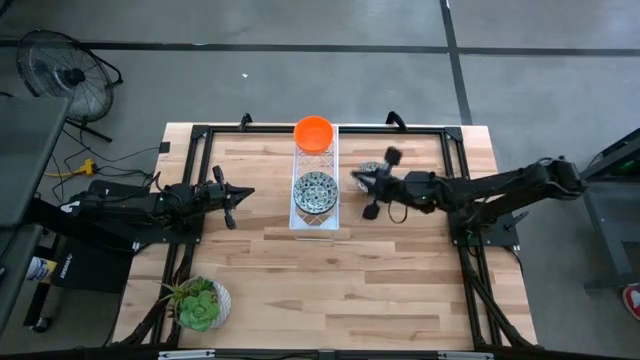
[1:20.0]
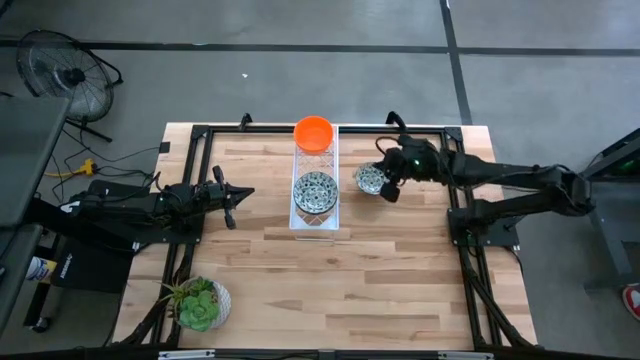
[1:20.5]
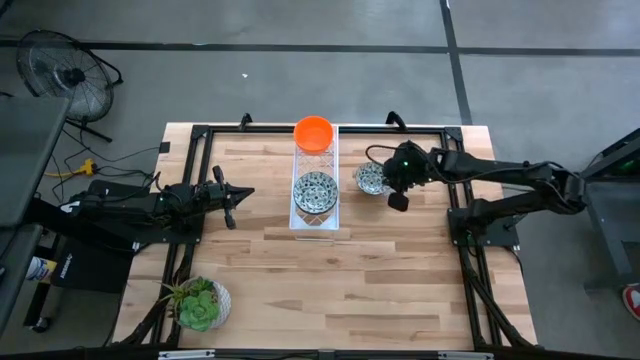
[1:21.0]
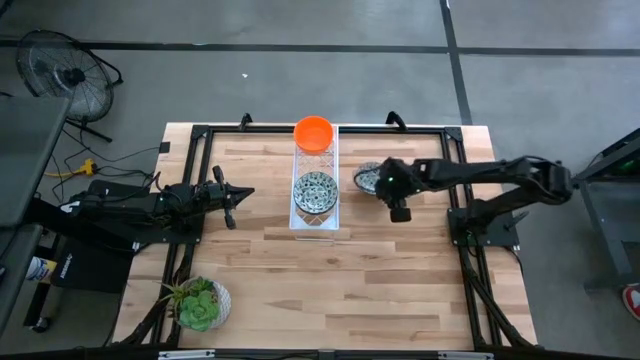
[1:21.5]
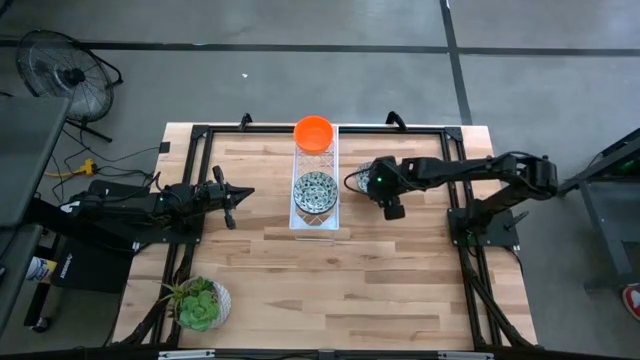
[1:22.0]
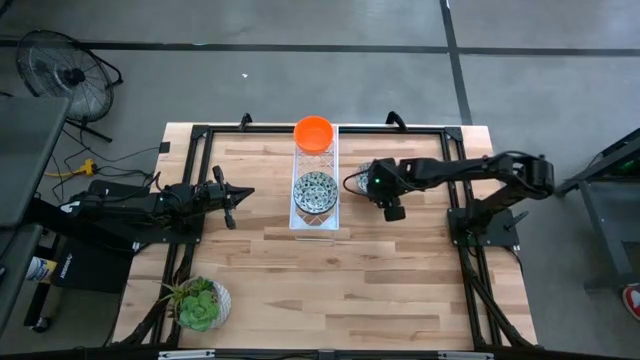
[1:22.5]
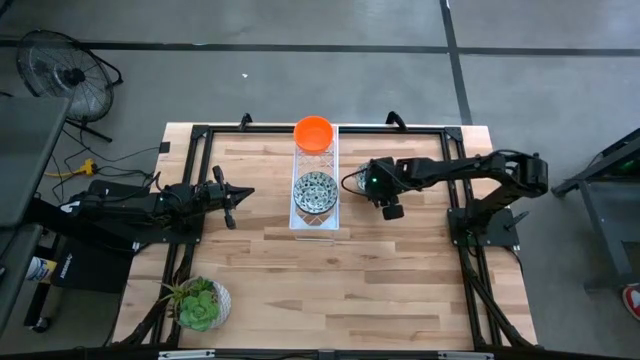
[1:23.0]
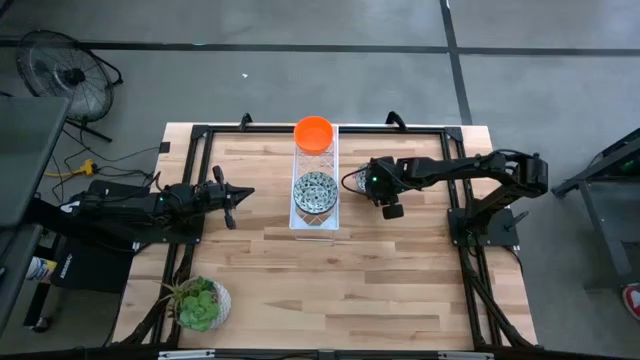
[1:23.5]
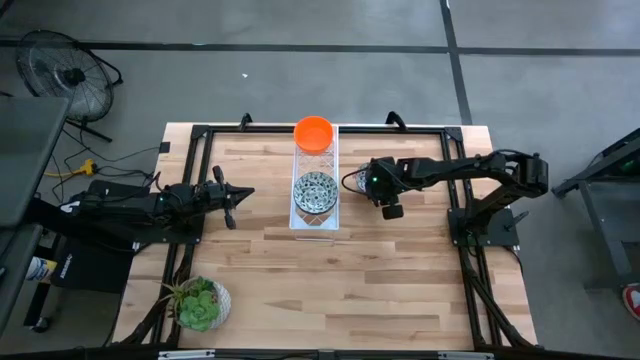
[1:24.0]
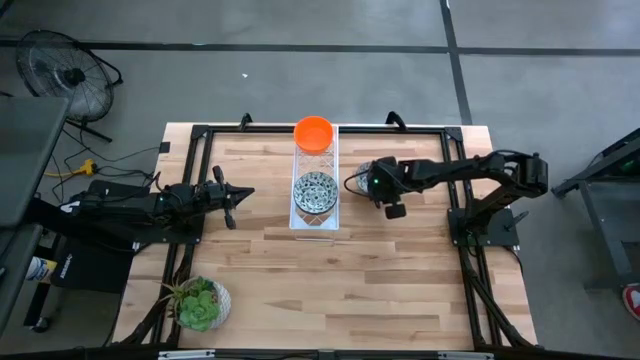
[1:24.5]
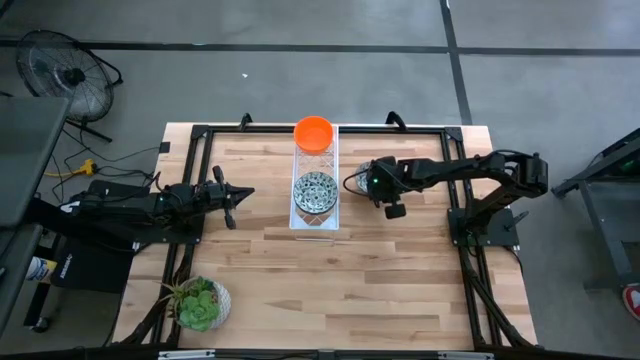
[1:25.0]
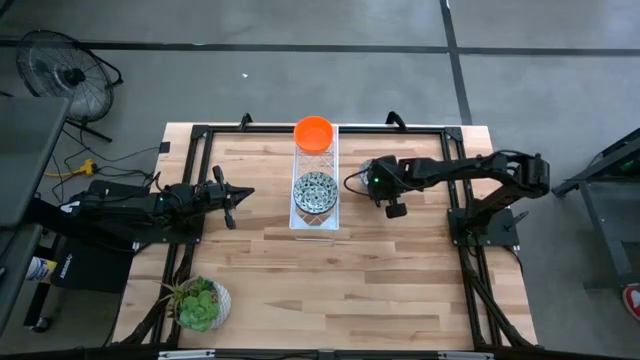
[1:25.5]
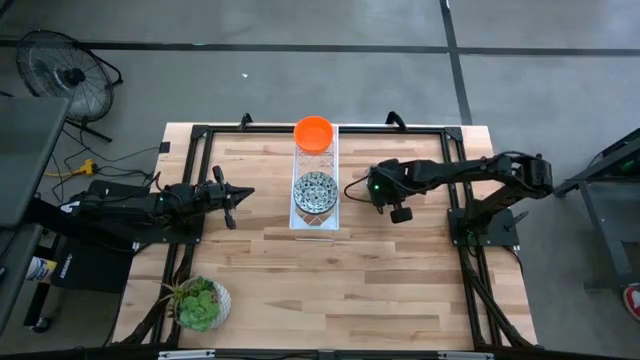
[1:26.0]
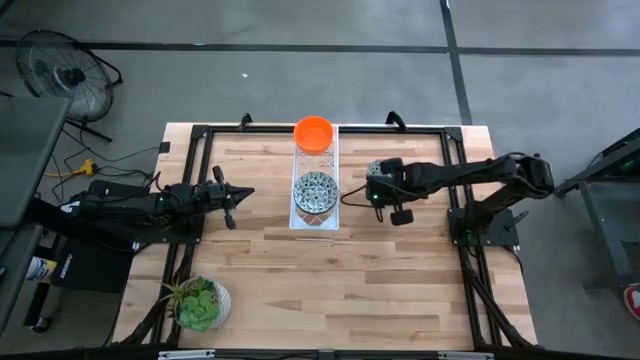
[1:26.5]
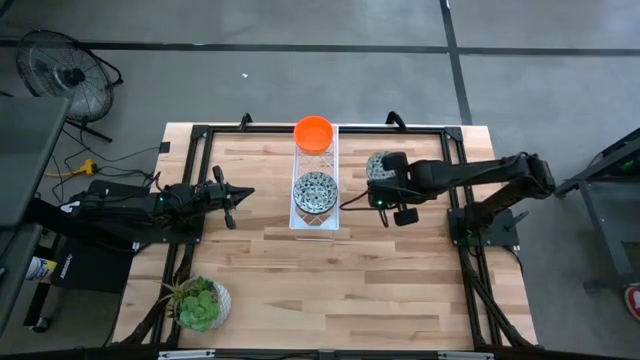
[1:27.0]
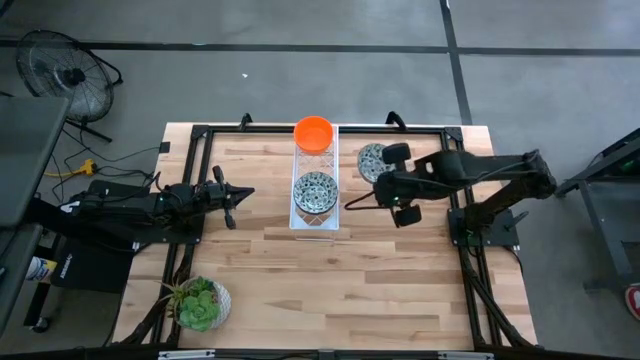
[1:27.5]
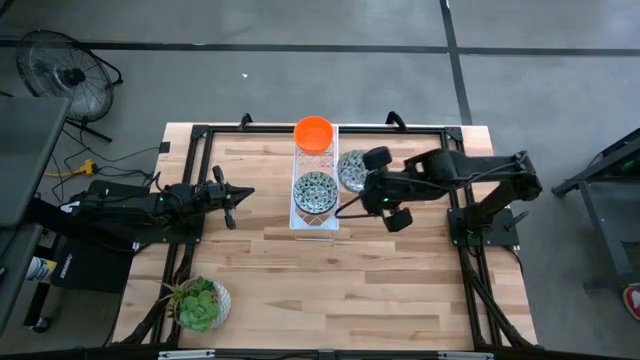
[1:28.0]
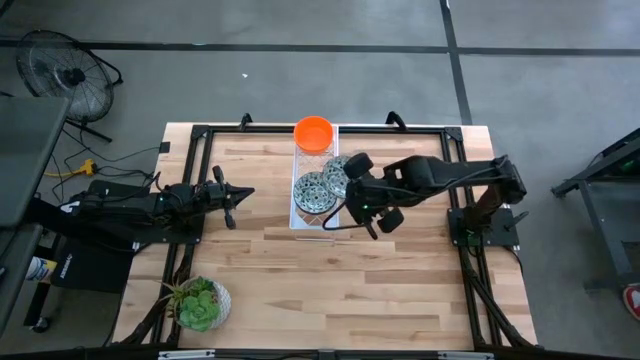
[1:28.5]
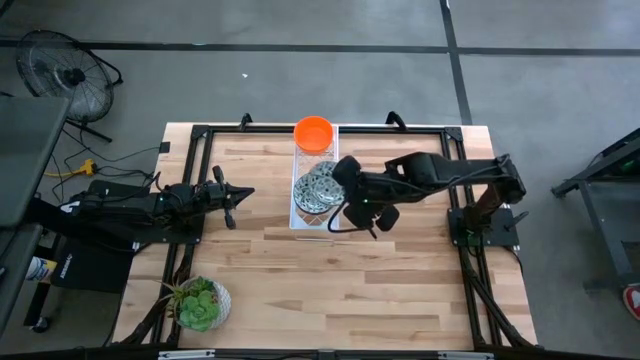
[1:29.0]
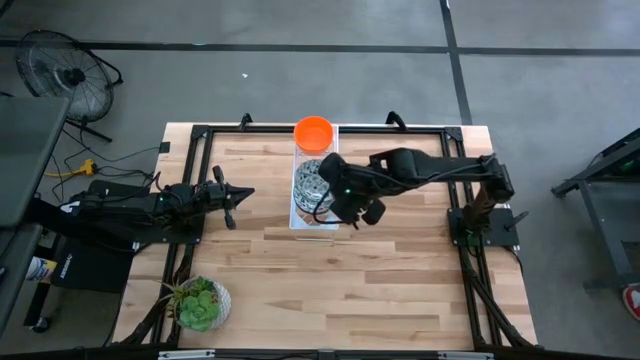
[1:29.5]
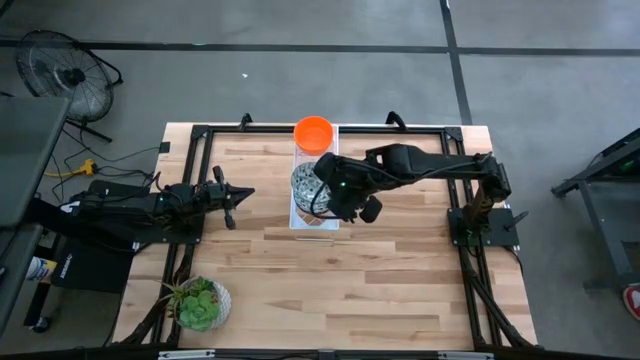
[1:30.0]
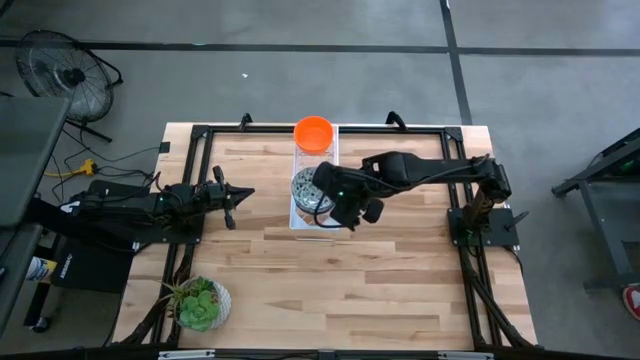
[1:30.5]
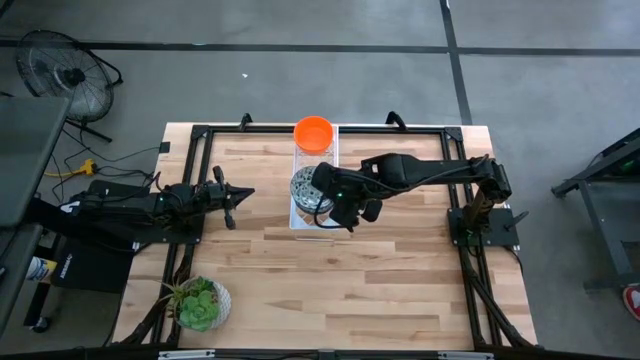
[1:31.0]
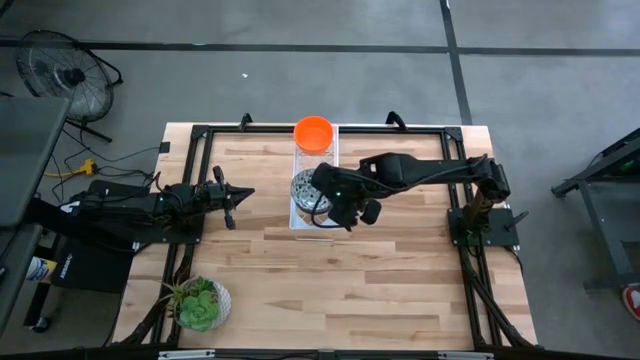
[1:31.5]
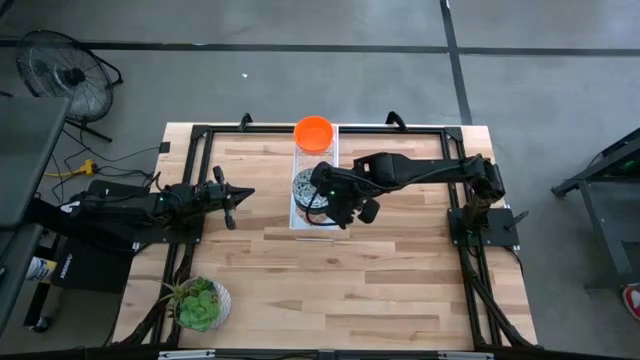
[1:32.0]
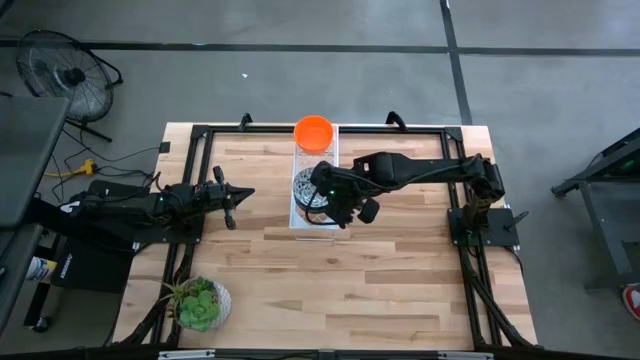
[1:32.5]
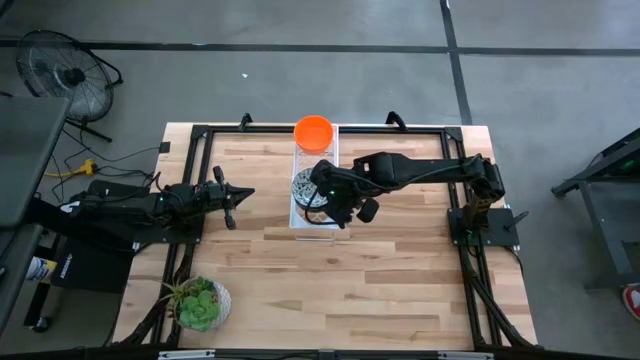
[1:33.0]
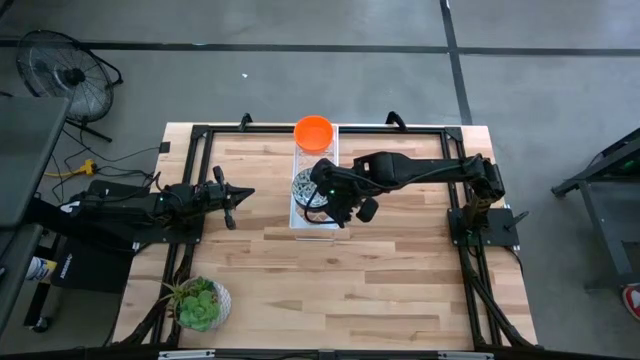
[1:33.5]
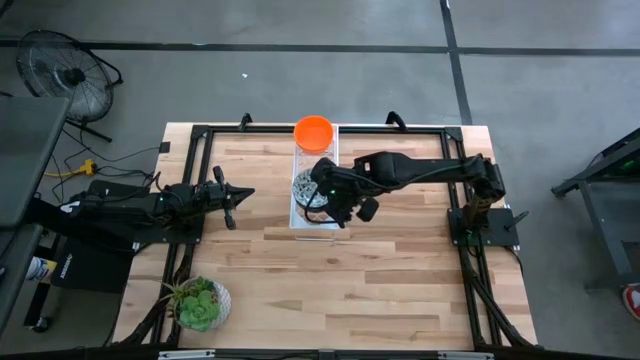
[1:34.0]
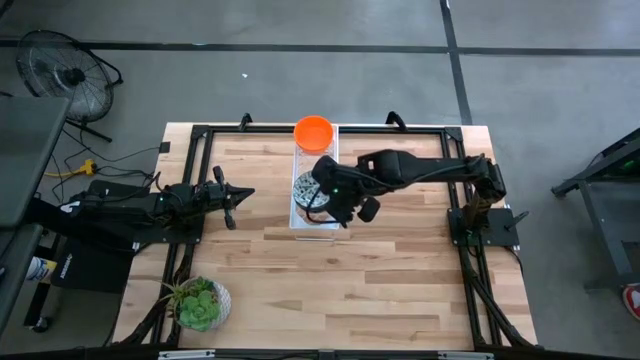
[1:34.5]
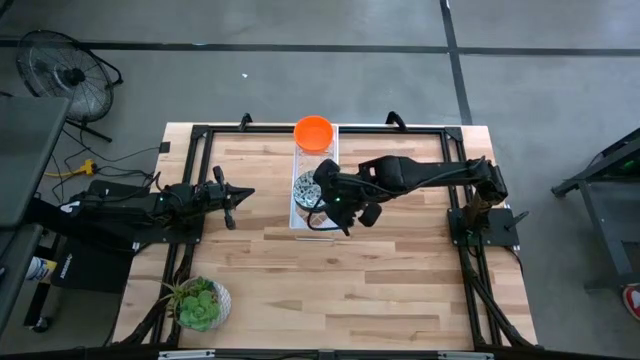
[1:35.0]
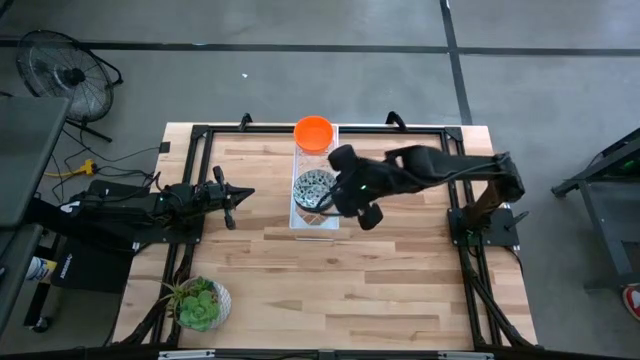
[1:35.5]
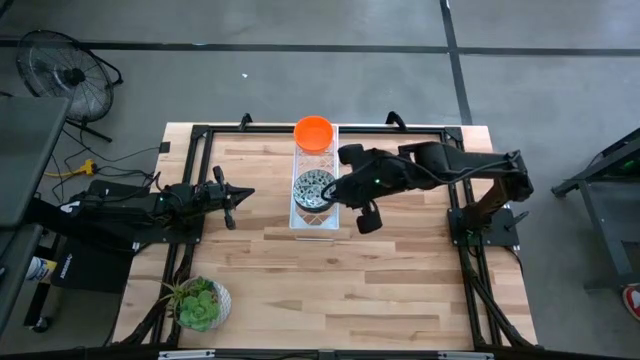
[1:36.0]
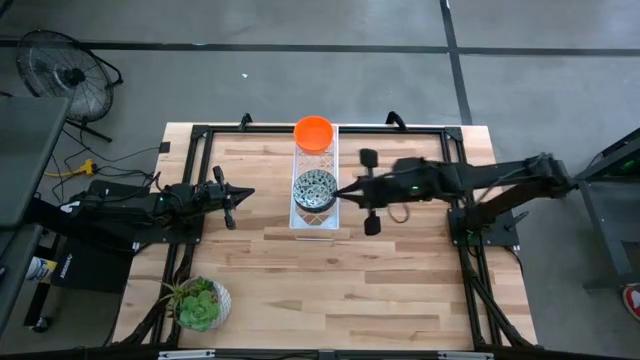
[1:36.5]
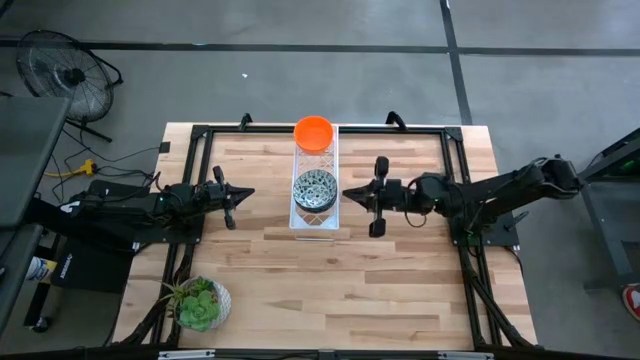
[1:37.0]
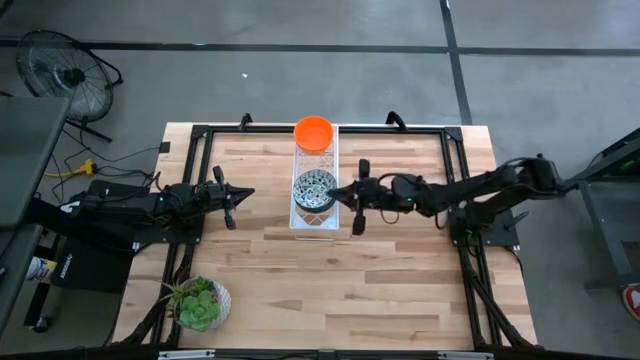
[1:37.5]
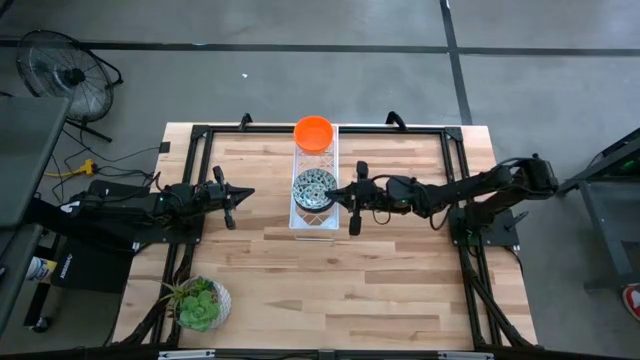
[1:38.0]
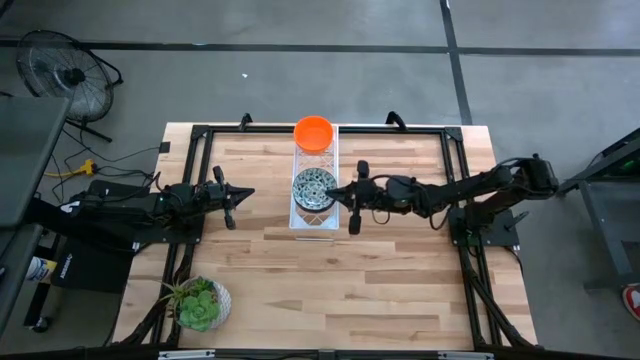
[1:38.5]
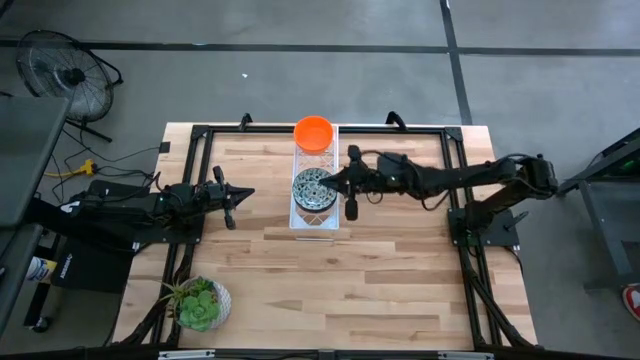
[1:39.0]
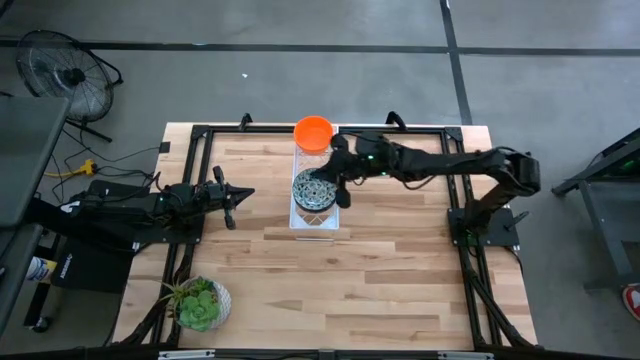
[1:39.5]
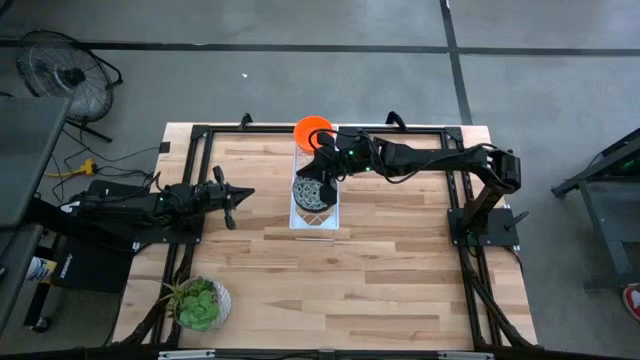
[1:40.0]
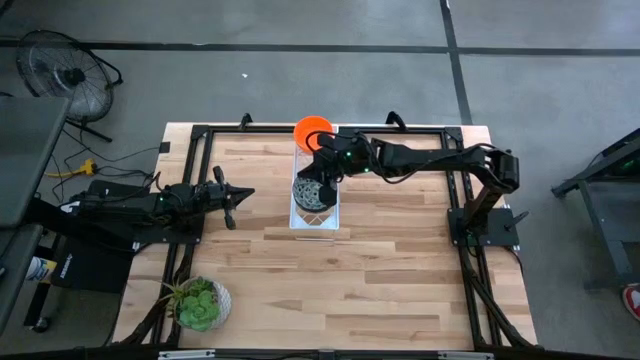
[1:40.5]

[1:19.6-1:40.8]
Task: Pick & Place Mini bowls
Stack the blue white pattern bowl on top of the other blue white pattern bowls on the shelf
